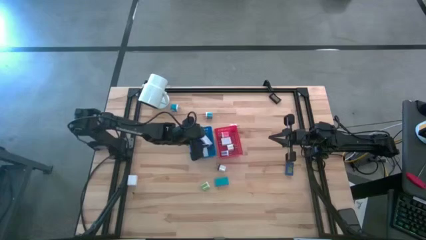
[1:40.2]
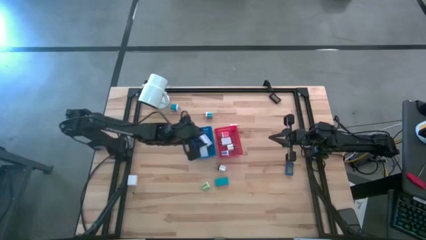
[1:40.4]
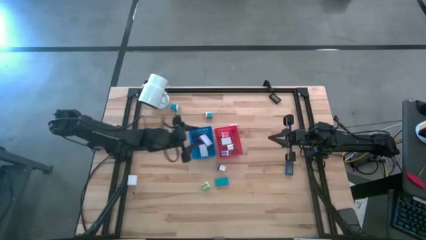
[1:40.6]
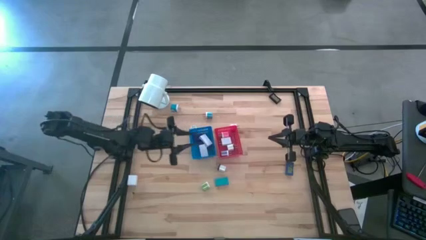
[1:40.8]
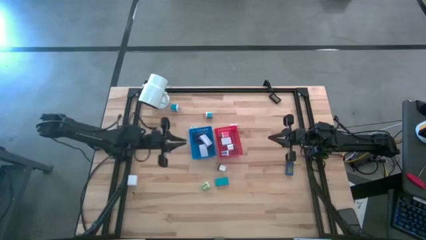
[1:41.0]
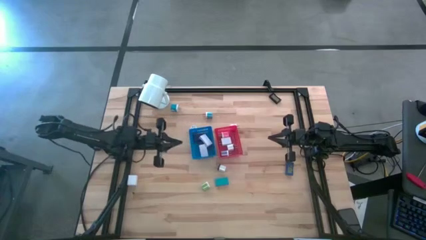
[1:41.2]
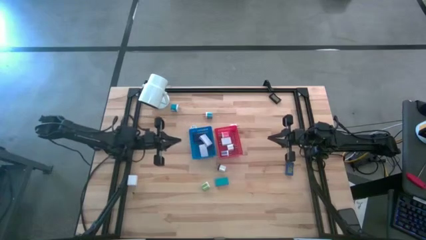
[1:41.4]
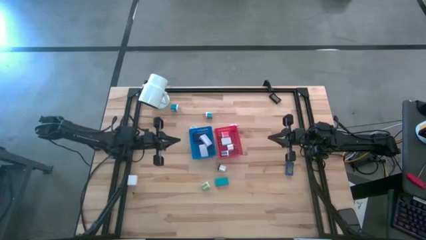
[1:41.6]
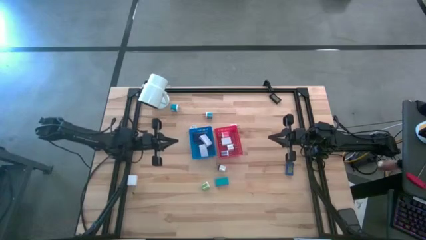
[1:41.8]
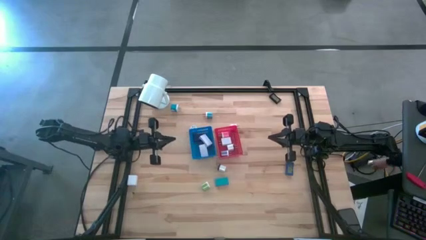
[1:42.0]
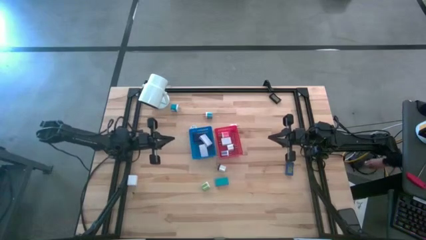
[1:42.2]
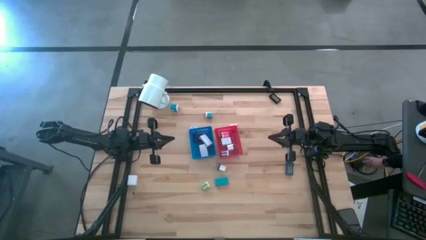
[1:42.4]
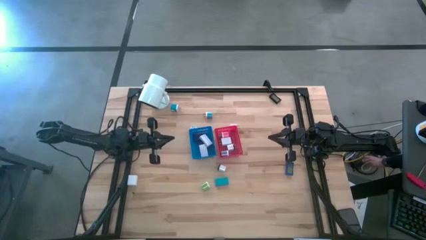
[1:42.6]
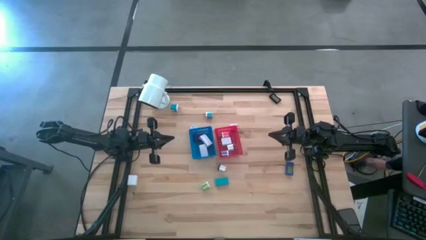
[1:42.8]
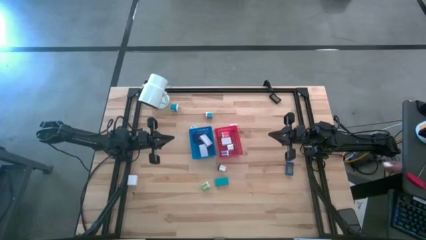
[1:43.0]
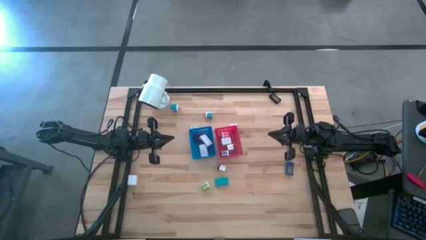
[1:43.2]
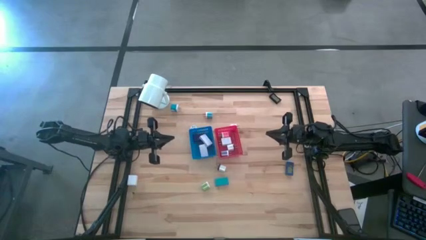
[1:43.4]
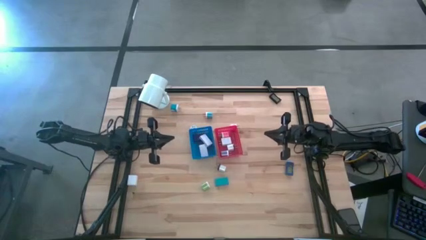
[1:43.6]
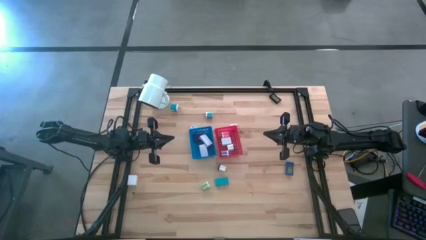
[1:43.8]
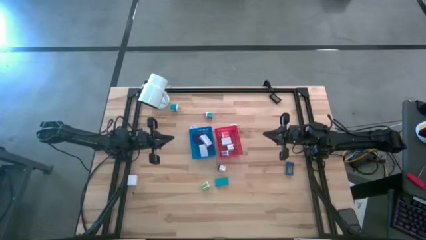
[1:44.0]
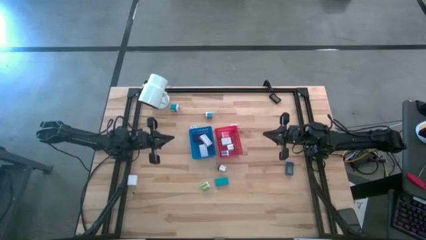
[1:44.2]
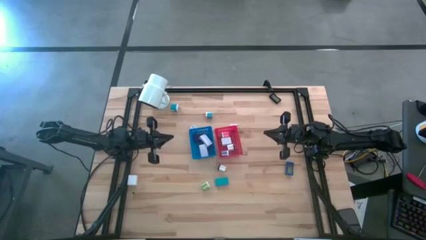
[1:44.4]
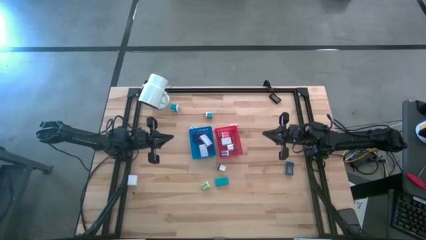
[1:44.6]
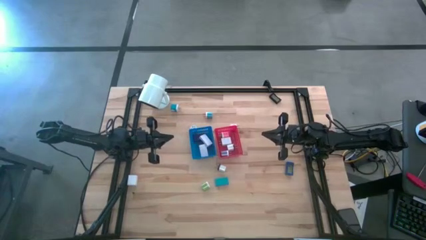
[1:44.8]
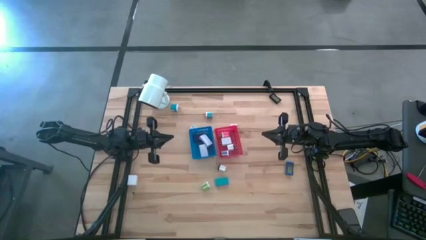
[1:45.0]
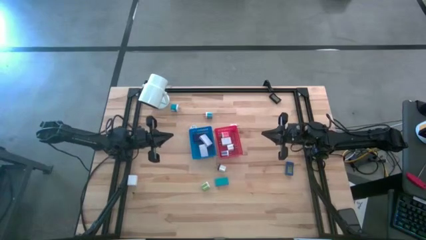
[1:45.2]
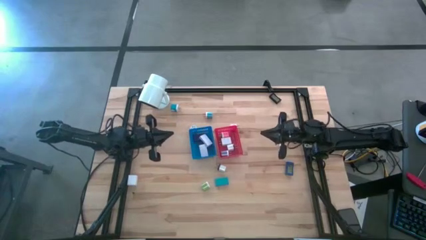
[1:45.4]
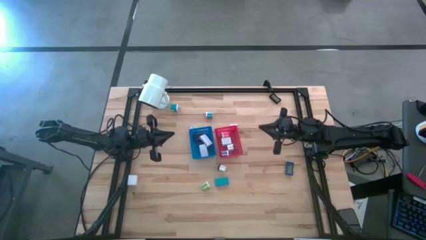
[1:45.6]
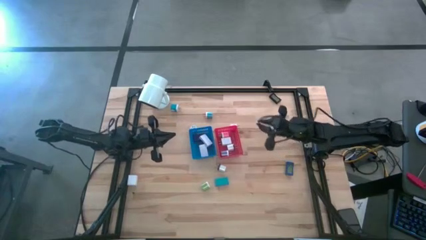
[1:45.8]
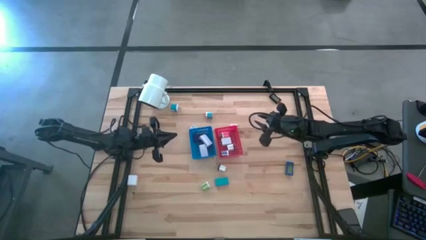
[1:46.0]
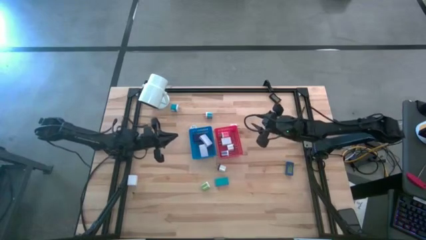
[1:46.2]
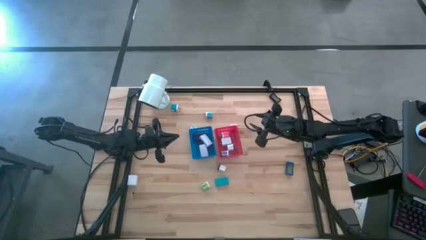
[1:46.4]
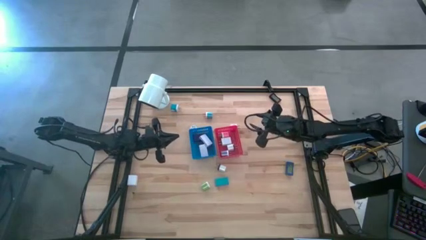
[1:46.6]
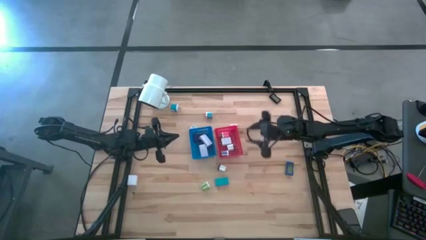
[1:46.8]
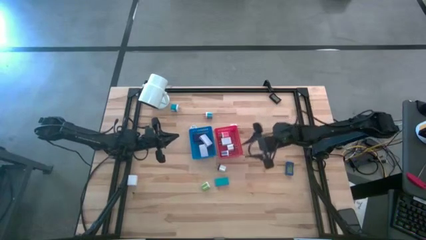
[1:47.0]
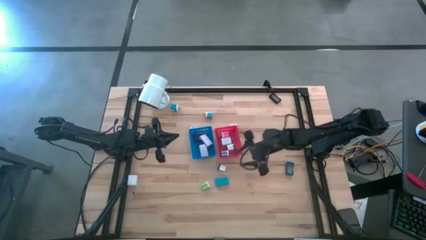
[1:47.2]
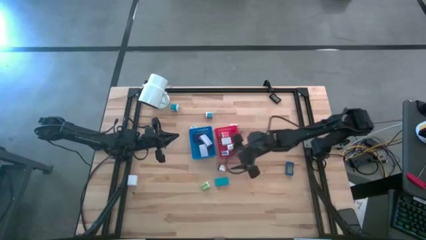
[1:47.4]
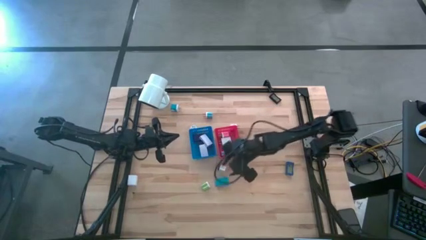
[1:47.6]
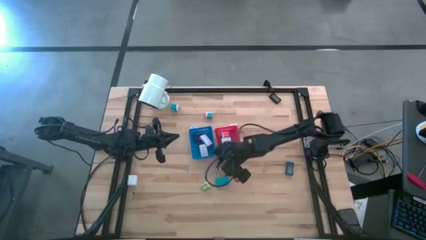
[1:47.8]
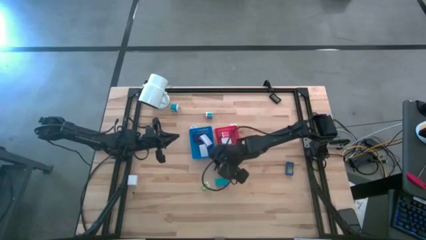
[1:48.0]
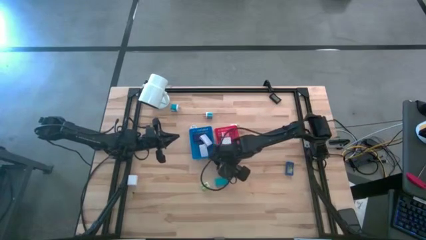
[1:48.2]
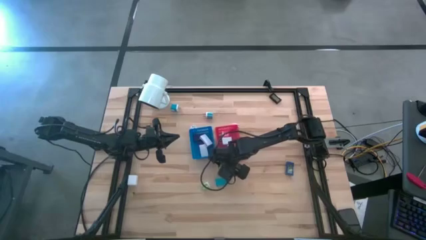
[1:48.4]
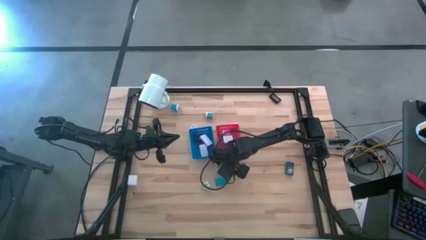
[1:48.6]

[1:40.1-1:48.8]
Task: Pick & Place Office items
Put the black charger adapter into the red bin

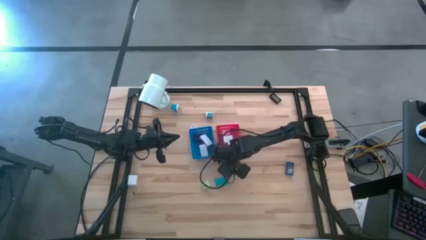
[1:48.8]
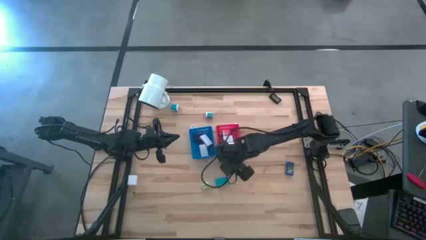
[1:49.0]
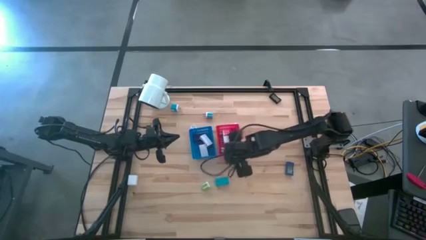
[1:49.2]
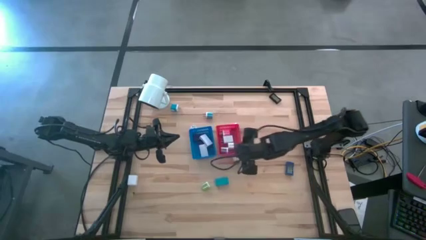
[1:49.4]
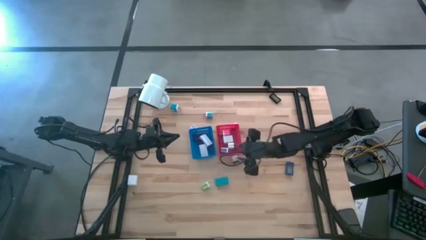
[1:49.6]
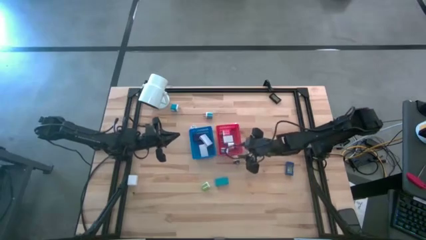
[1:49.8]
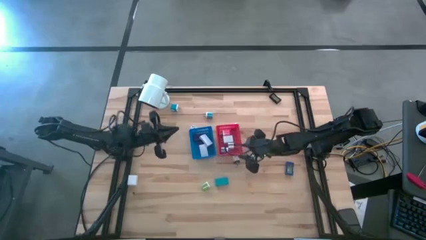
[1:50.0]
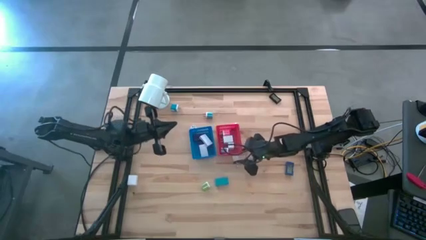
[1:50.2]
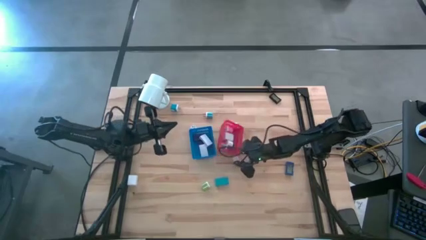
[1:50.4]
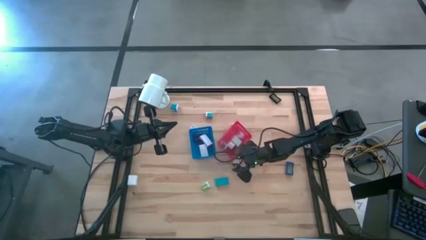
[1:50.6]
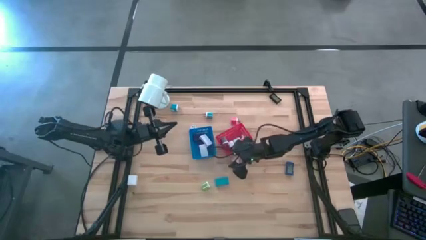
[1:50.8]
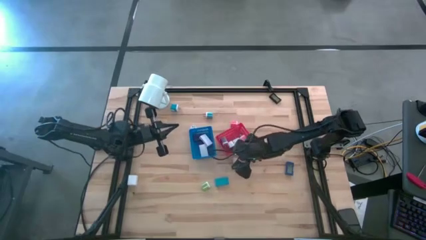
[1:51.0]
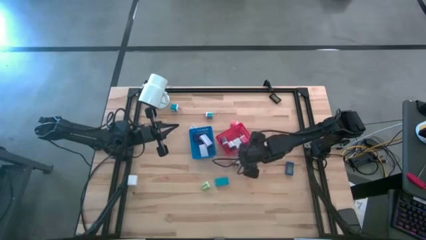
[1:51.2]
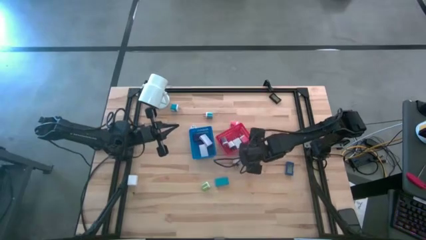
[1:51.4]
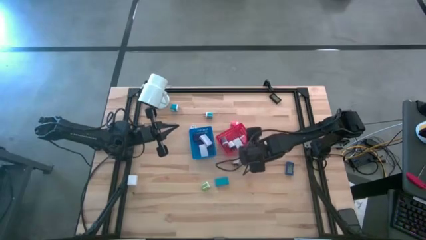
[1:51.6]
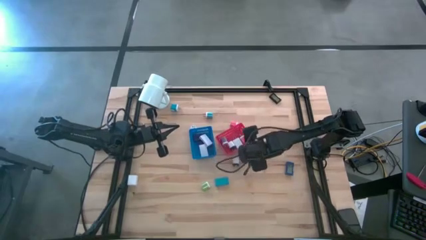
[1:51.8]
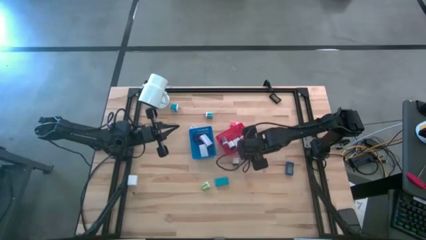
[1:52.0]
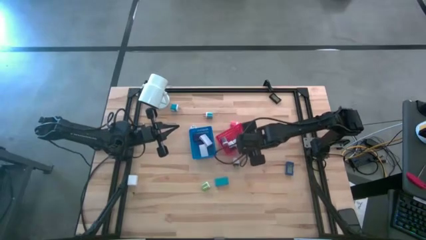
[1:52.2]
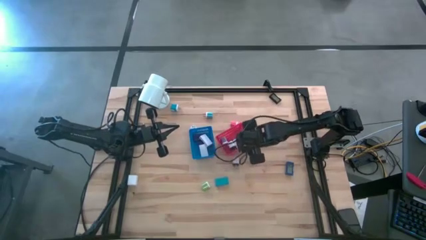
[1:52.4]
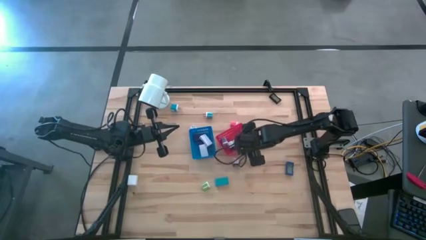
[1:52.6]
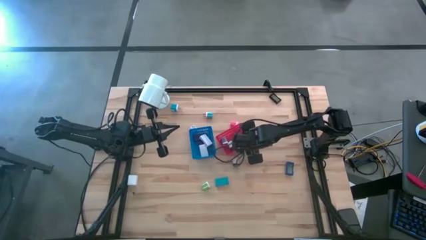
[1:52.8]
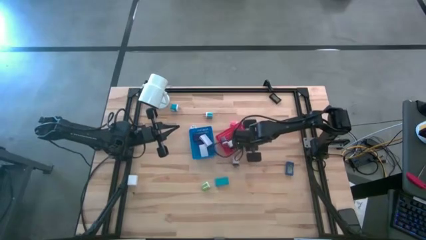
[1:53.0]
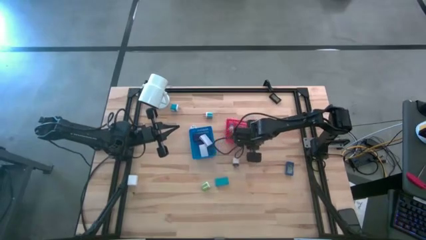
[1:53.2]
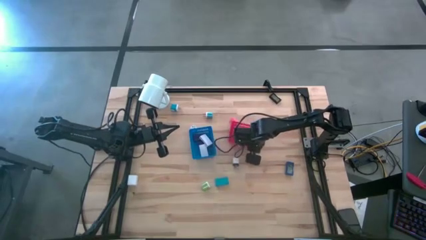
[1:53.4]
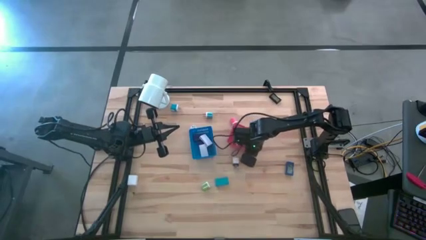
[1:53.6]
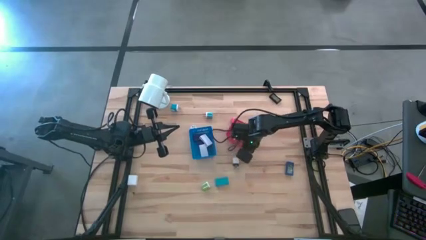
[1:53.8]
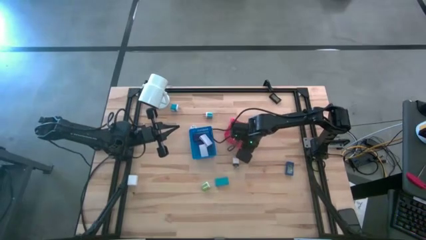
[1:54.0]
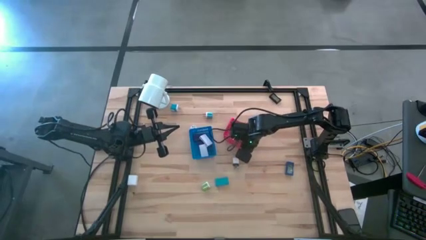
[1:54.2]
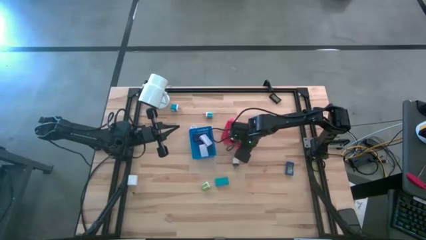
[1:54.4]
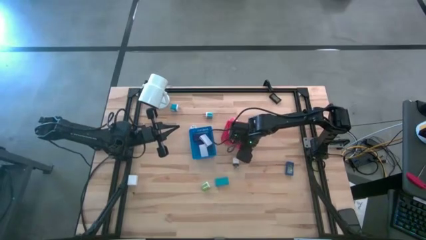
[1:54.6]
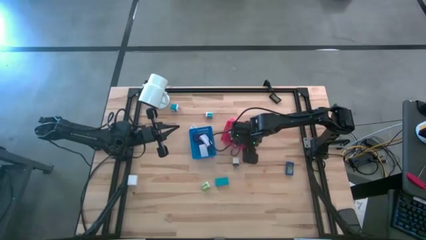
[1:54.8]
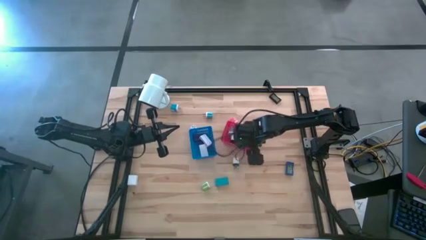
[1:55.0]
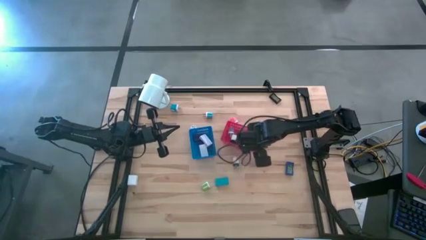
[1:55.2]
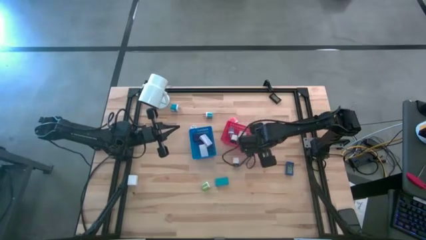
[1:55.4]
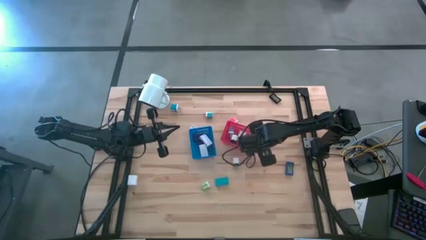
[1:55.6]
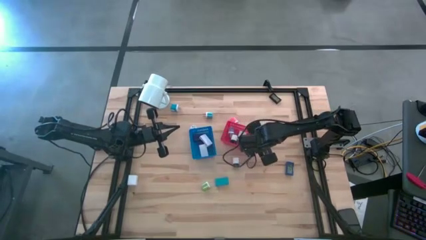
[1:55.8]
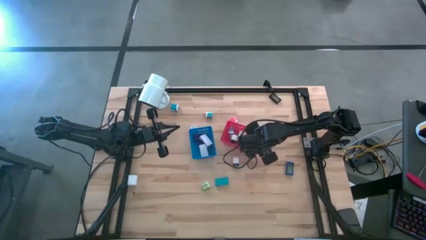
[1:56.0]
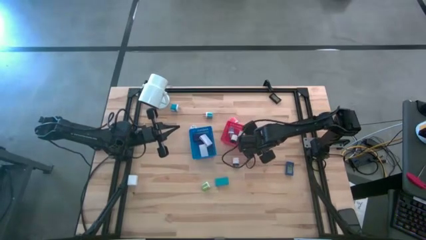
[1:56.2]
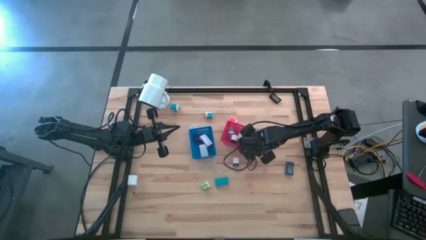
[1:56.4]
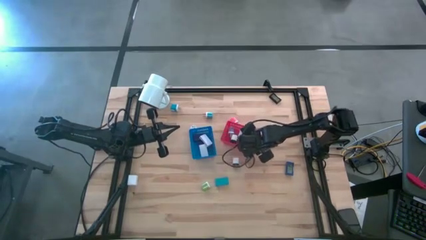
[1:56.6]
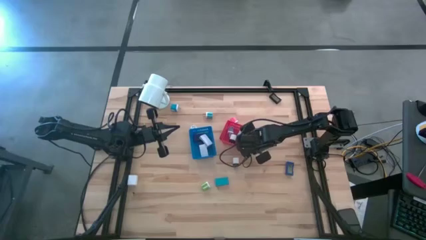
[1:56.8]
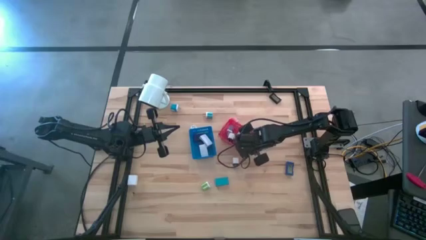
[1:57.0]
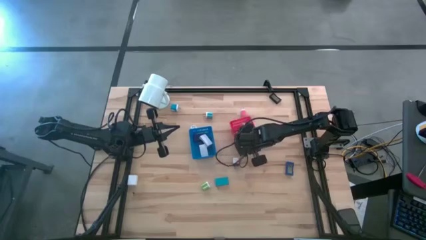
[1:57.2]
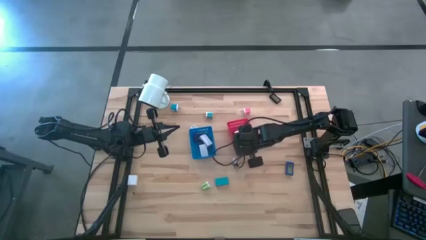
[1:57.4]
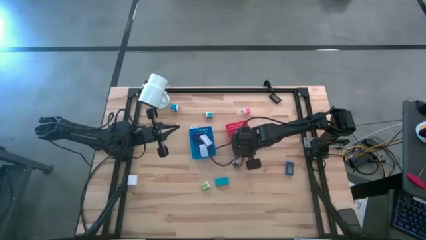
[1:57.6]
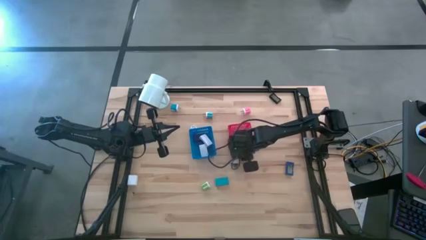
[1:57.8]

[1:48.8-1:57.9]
Adjust the red bin
